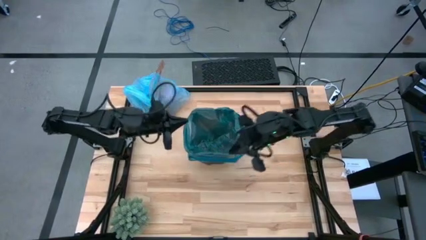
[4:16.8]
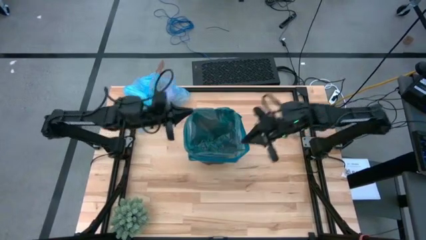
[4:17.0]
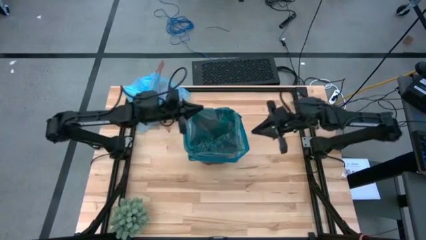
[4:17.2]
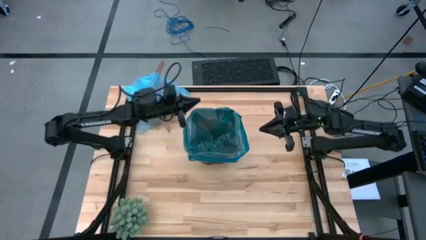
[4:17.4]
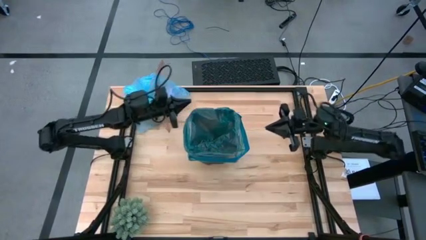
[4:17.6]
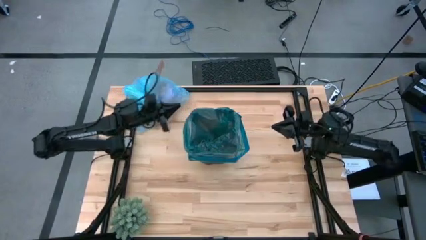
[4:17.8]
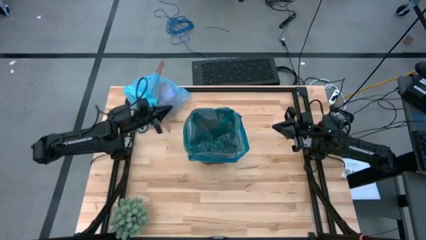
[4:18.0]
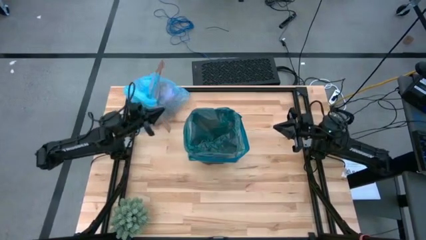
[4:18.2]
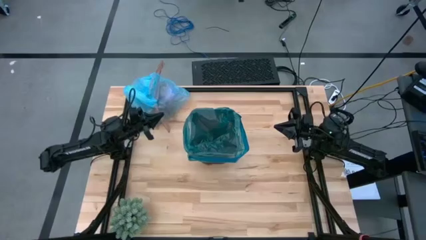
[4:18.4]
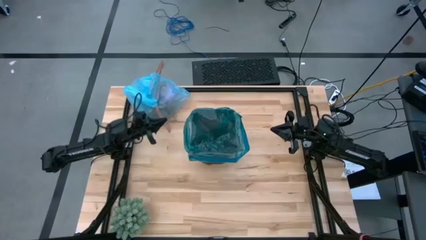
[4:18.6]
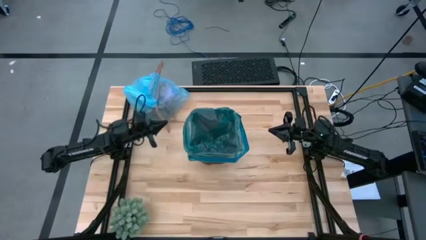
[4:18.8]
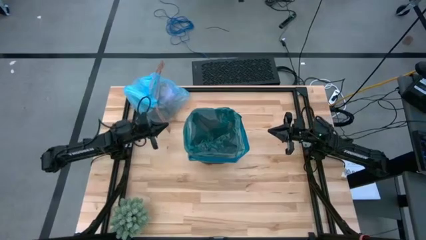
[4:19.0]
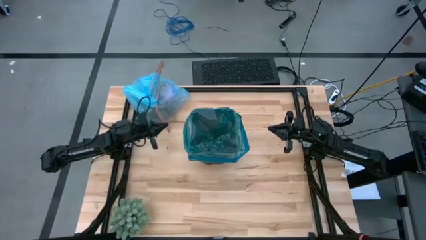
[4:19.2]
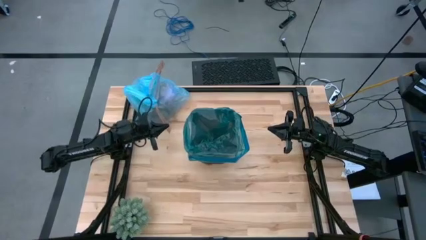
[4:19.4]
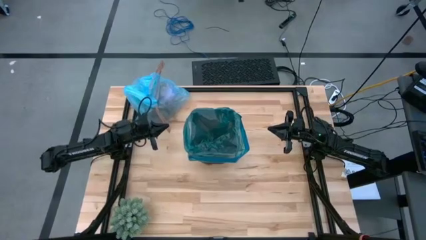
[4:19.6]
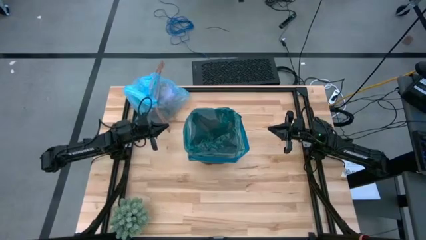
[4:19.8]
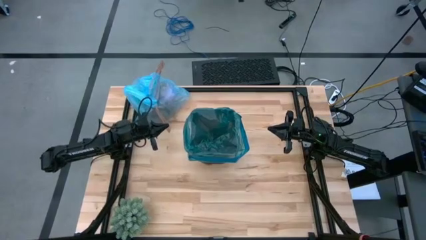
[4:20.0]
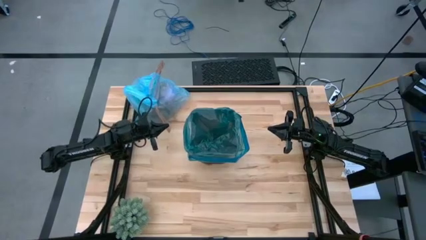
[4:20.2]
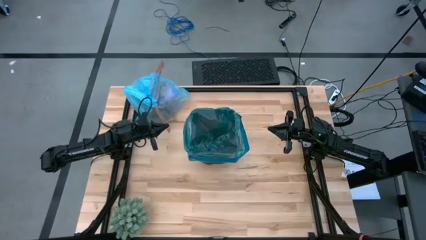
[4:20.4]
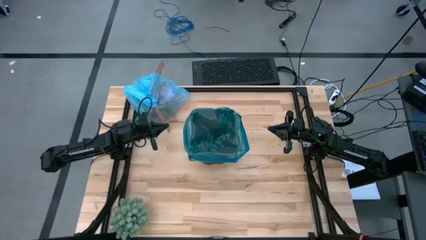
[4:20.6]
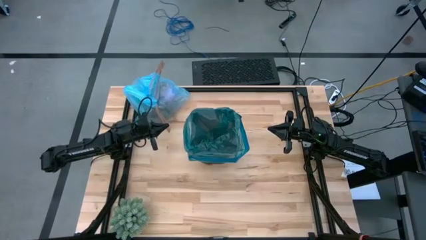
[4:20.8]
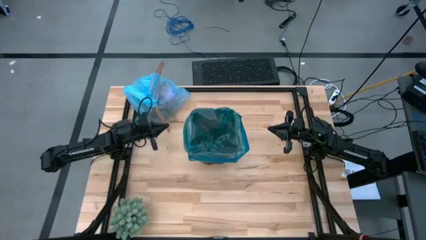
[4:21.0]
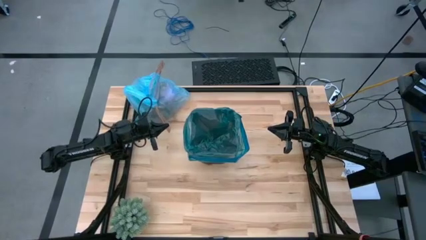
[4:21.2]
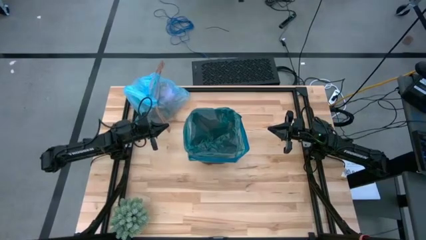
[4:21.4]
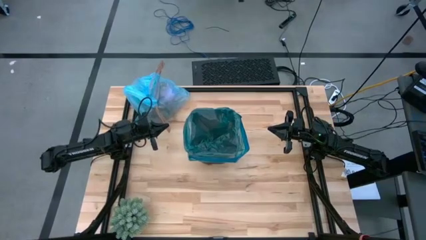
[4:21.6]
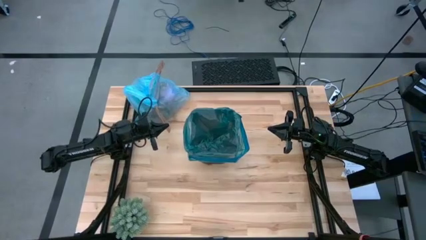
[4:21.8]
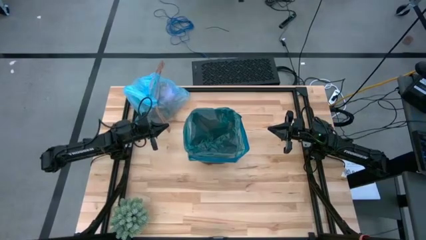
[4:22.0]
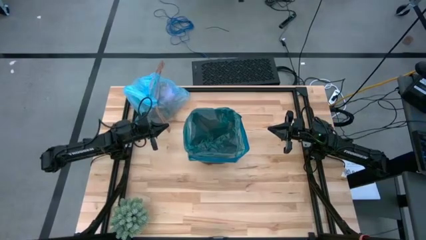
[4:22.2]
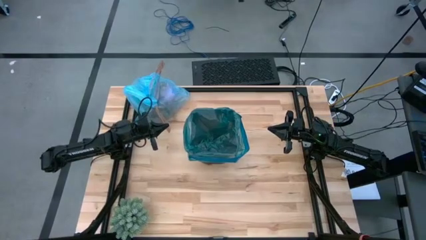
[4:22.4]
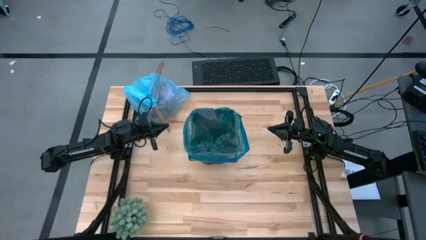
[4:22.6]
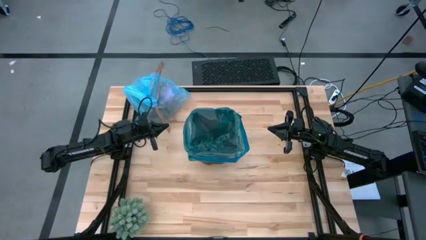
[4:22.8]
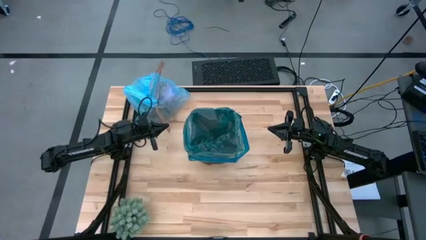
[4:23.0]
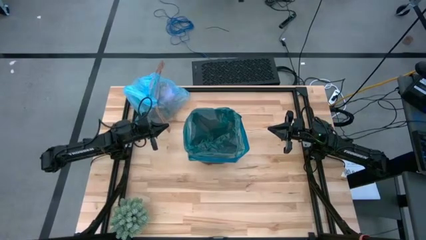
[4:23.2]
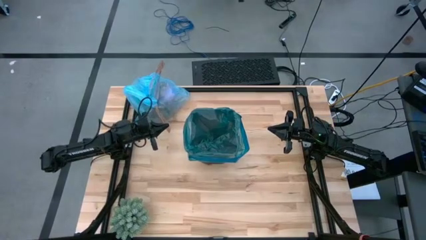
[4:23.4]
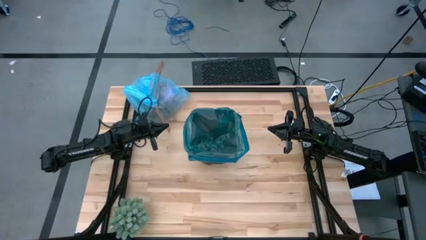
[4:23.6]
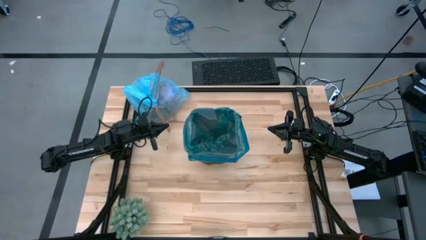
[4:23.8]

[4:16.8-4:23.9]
Task: place trash/remove bag and relplace
Return to Home Position

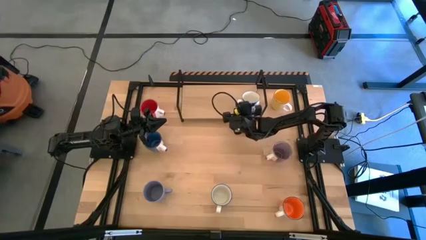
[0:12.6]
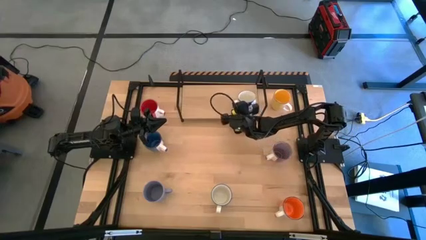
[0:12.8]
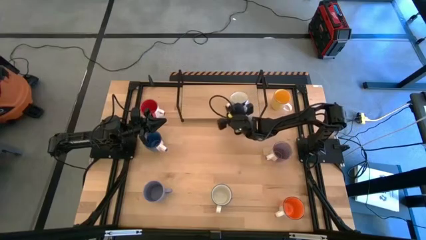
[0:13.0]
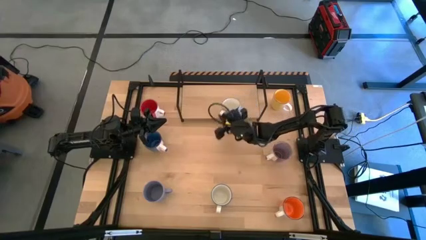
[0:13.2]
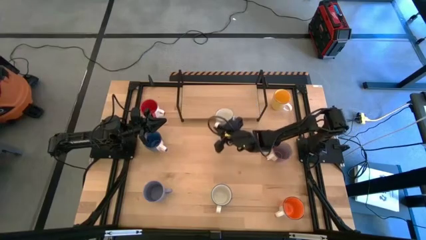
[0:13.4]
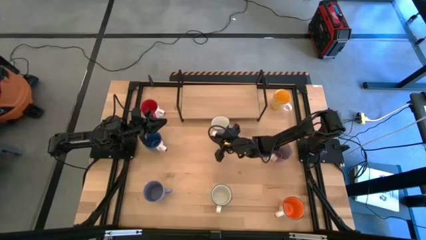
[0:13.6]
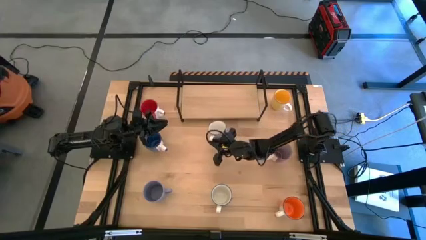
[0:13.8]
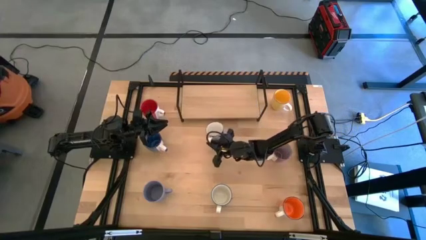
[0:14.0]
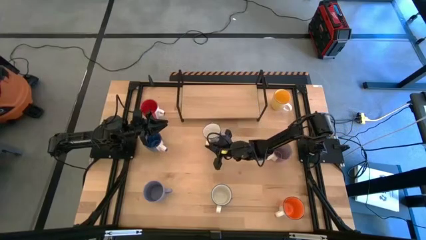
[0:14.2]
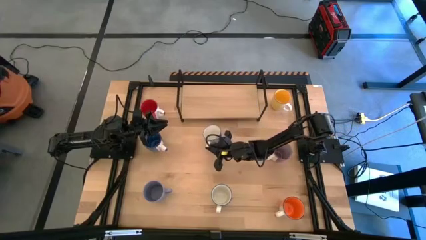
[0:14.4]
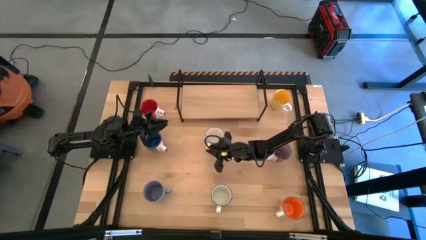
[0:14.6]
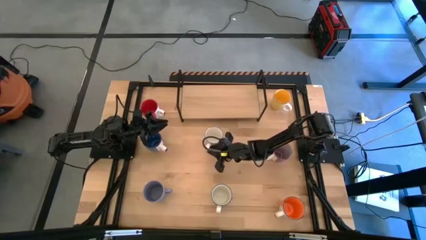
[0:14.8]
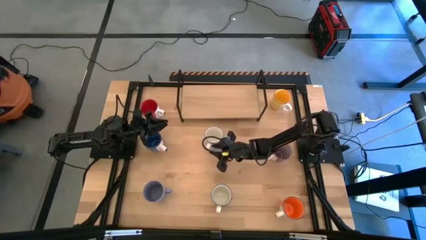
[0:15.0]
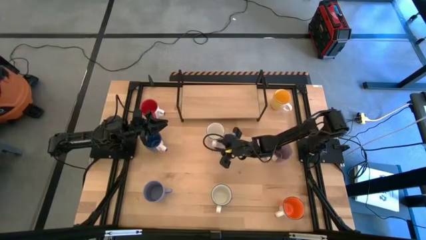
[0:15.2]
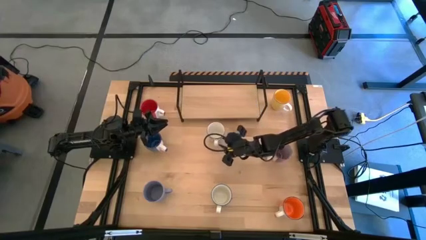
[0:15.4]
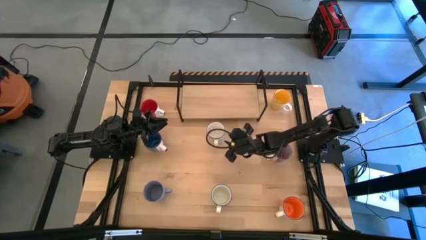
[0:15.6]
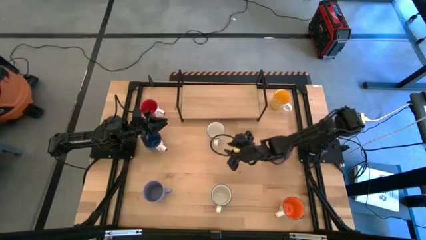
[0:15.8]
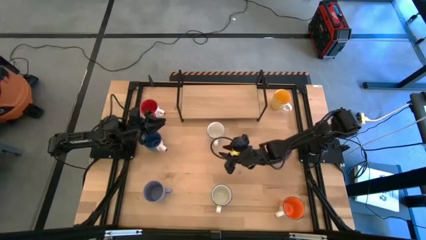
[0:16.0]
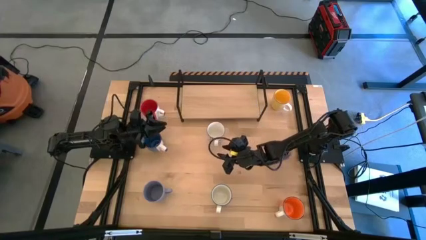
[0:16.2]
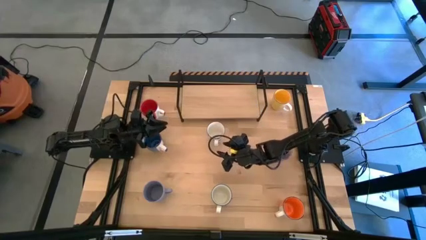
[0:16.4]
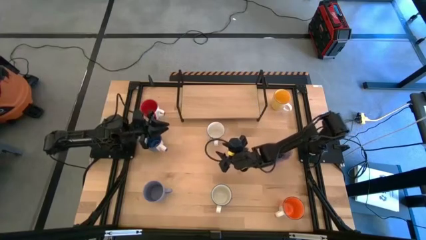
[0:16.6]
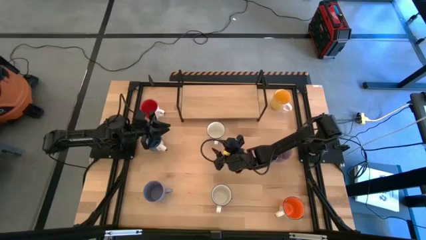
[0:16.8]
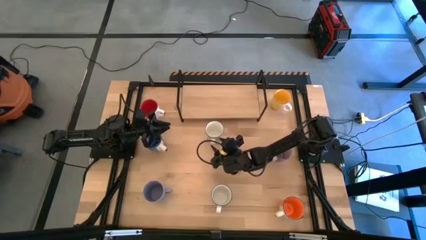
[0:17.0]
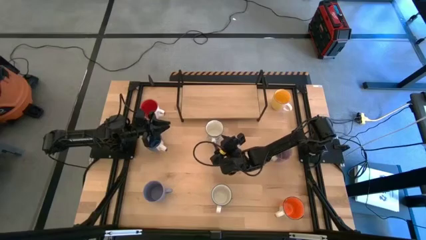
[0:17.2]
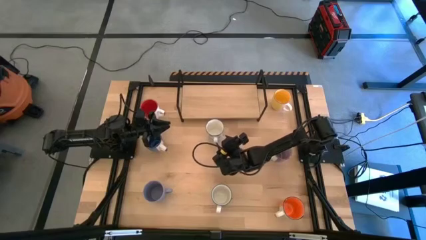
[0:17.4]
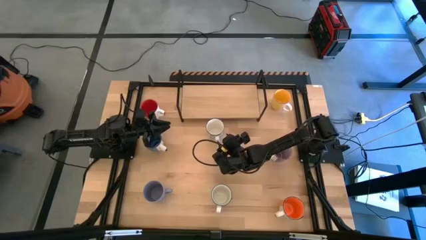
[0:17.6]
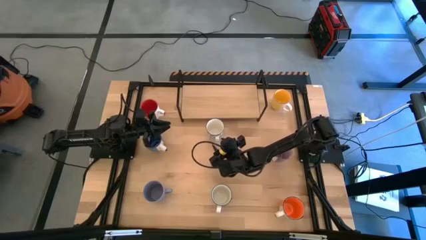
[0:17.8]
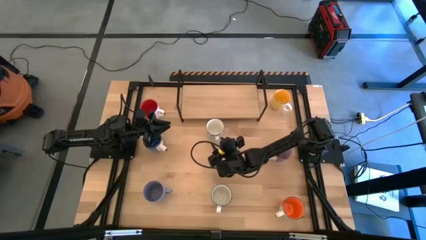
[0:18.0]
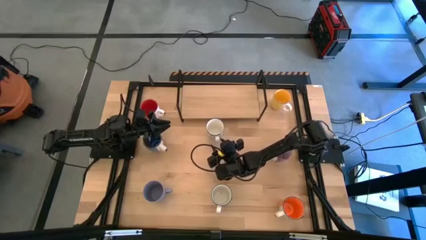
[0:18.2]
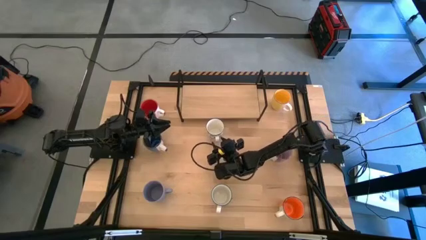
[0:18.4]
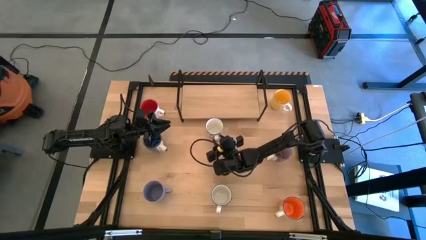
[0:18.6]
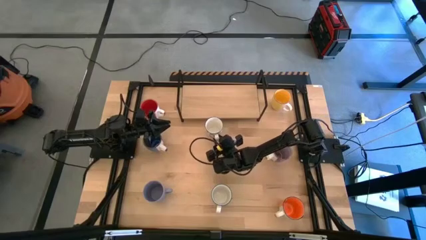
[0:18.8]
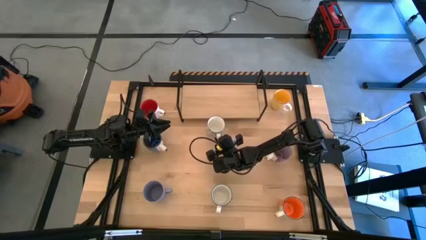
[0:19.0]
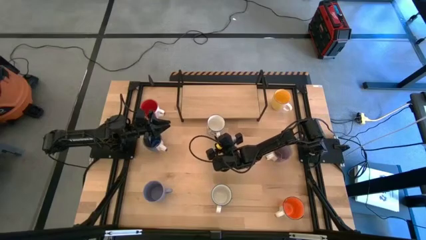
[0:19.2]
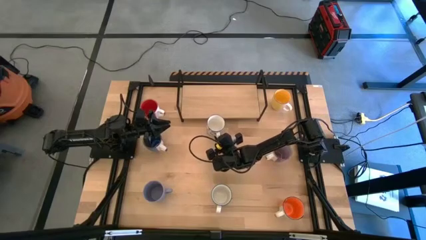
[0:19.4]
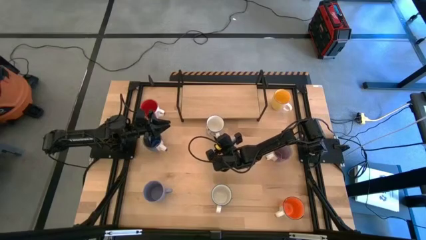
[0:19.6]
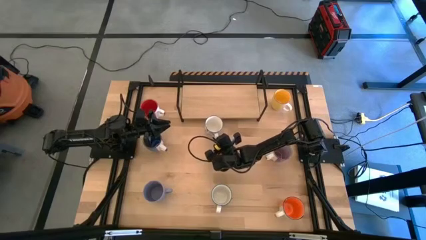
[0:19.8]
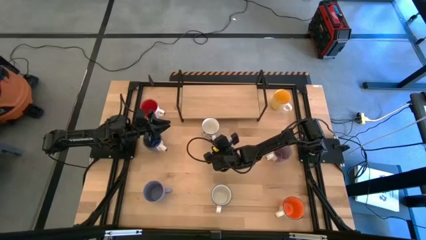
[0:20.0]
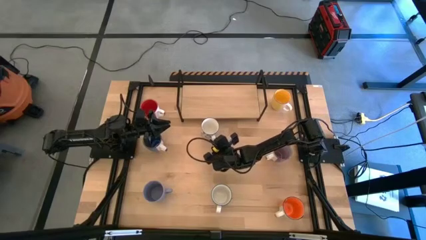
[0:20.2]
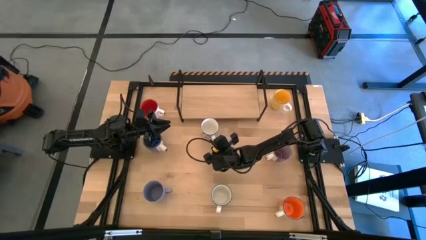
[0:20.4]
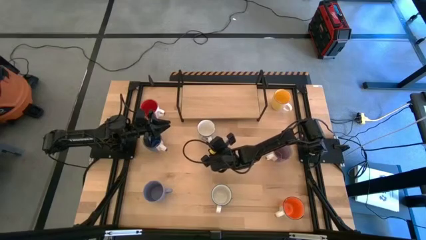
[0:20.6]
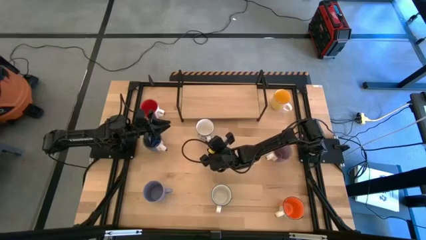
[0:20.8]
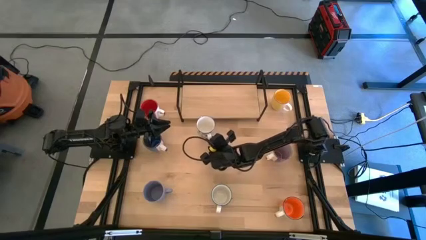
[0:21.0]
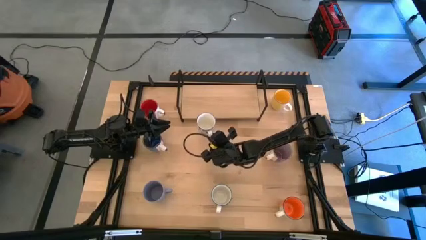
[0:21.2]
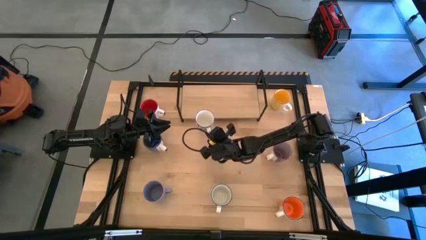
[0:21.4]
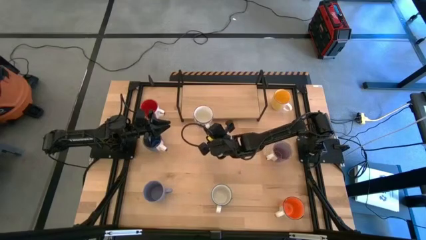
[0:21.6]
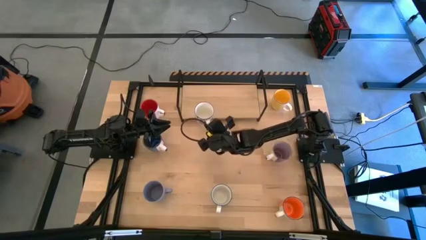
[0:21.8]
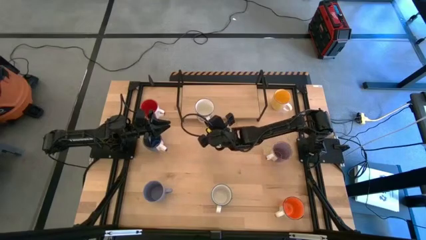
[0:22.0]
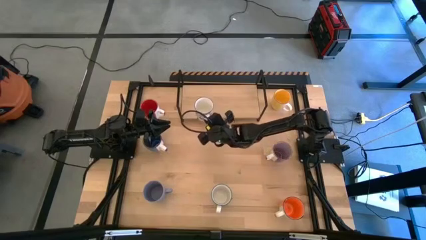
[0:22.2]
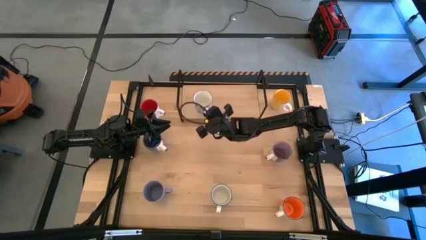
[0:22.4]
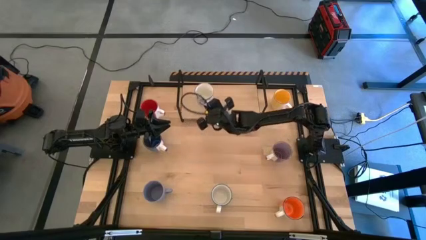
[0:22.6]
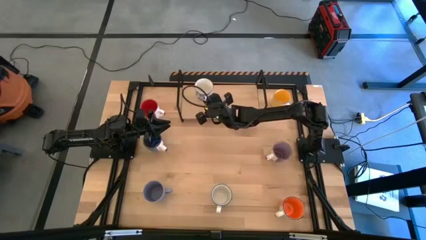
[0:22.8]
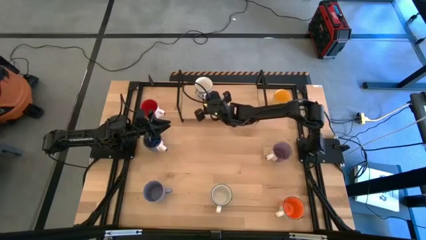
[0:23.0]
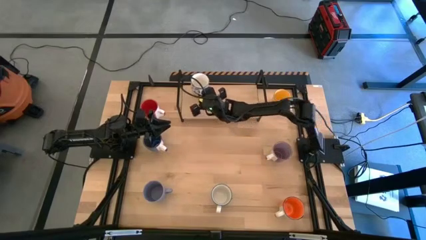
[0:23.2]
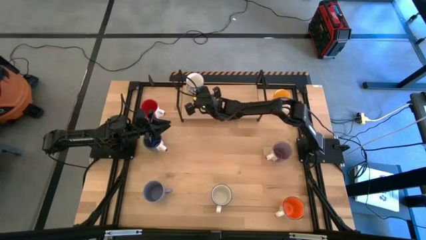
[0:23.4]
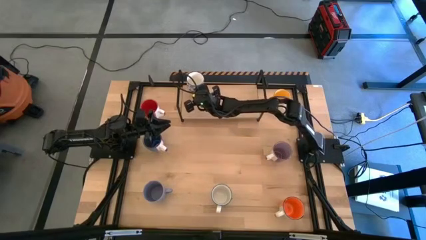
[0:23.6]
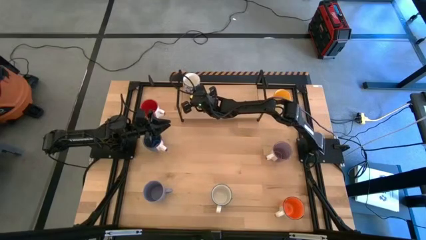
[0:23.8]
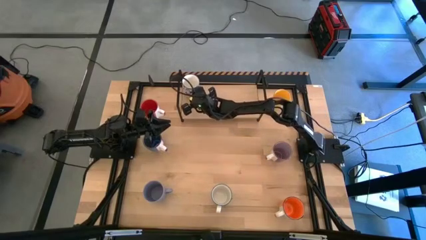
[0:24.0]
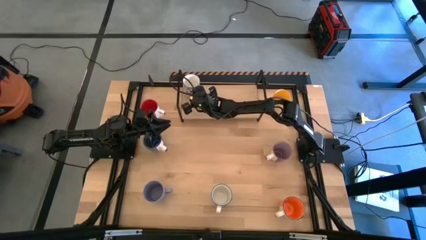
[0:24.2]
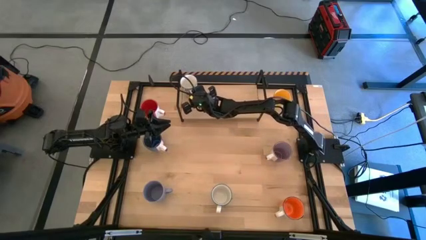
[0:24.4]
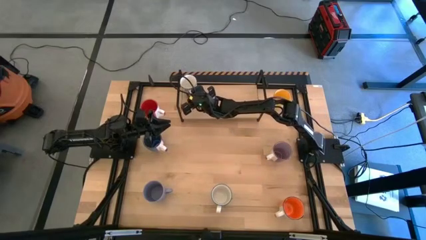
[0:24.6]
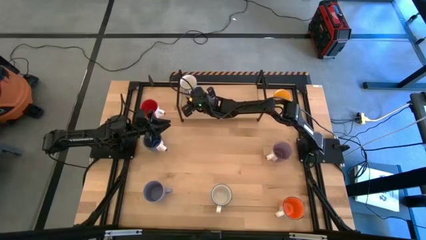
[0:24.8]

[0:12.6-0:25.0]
Task: Place coffee mugs
Put the top blue patterned mug on the shelf
